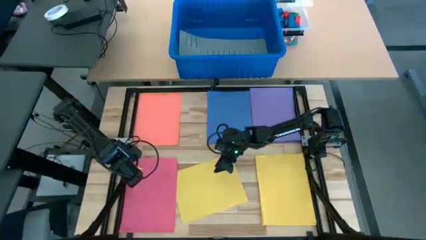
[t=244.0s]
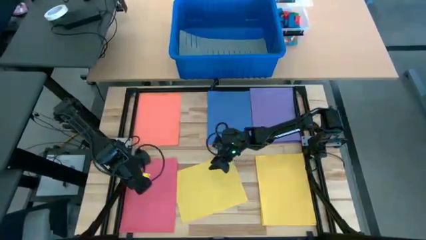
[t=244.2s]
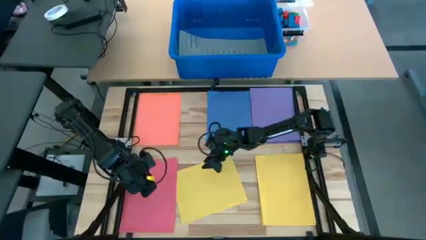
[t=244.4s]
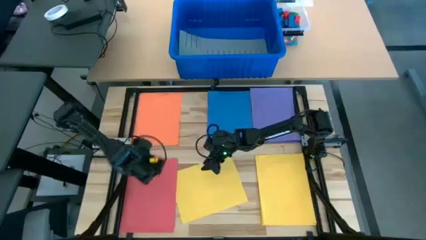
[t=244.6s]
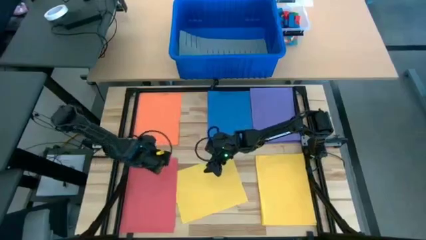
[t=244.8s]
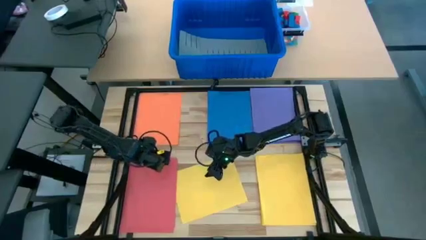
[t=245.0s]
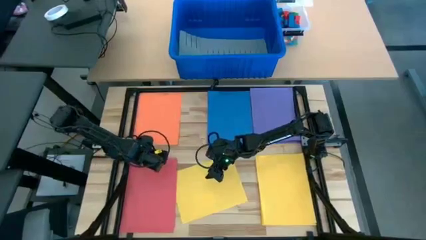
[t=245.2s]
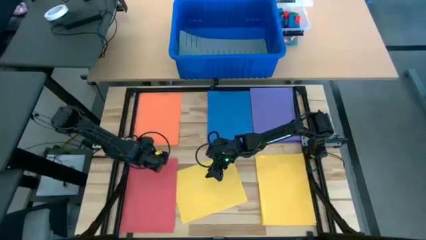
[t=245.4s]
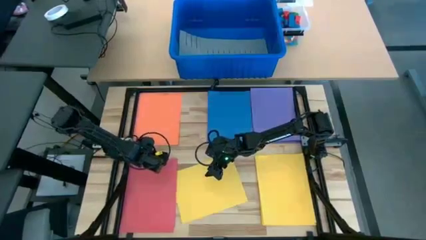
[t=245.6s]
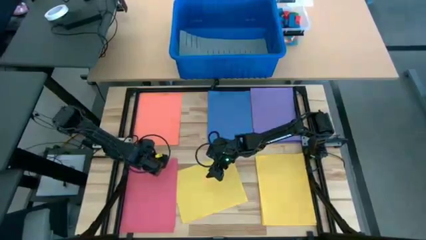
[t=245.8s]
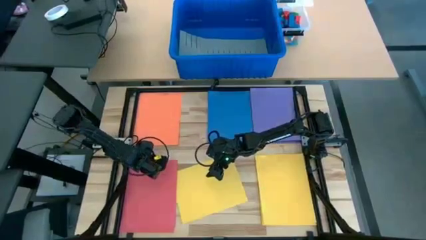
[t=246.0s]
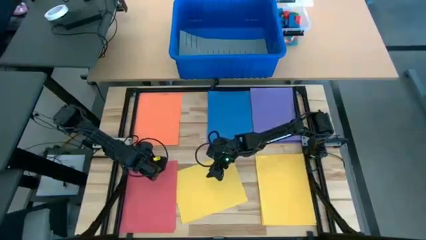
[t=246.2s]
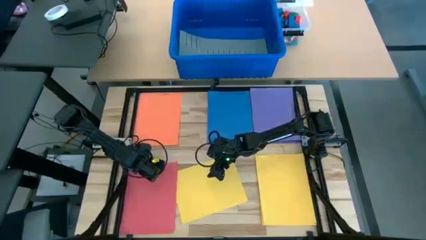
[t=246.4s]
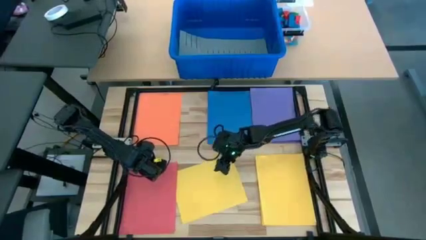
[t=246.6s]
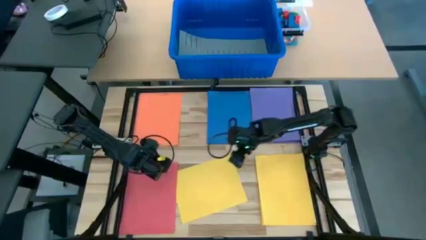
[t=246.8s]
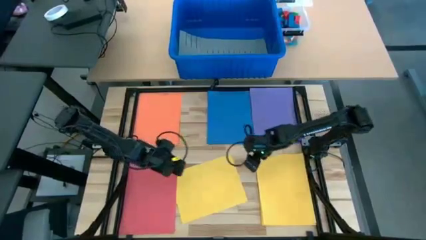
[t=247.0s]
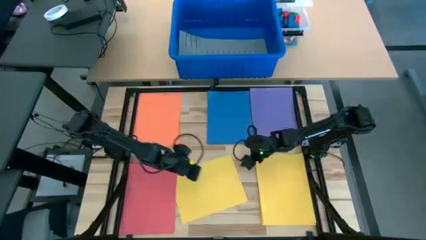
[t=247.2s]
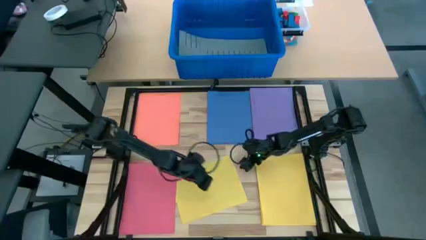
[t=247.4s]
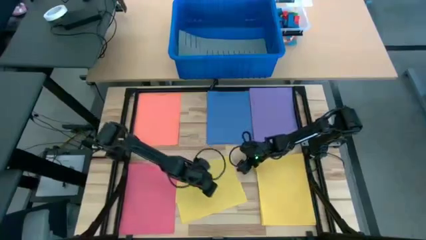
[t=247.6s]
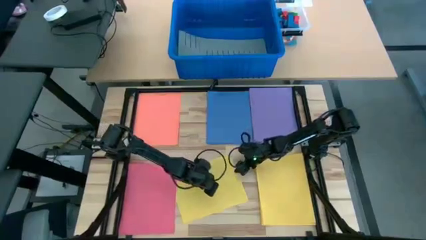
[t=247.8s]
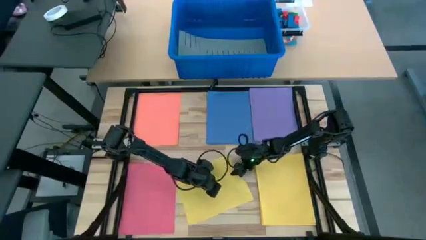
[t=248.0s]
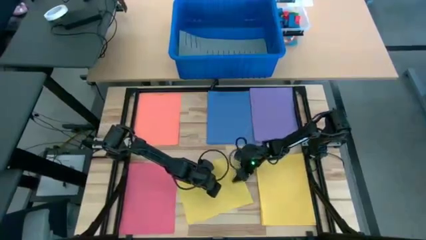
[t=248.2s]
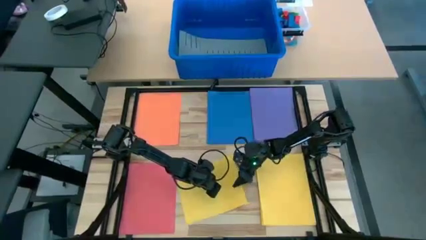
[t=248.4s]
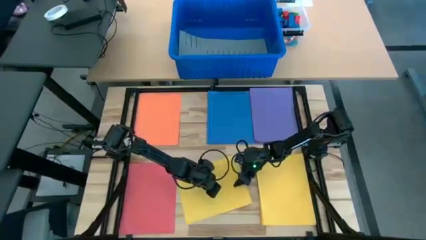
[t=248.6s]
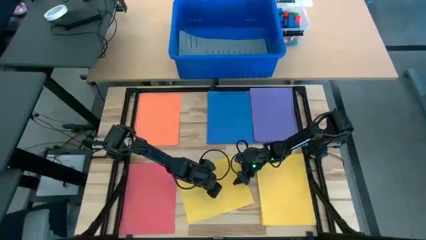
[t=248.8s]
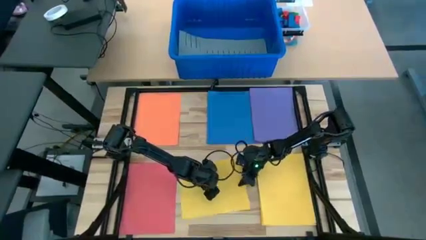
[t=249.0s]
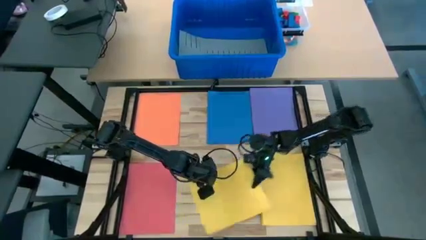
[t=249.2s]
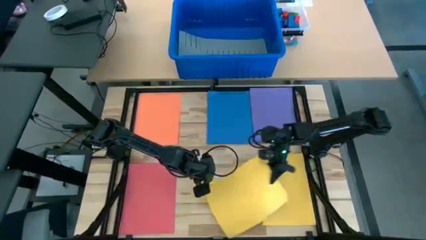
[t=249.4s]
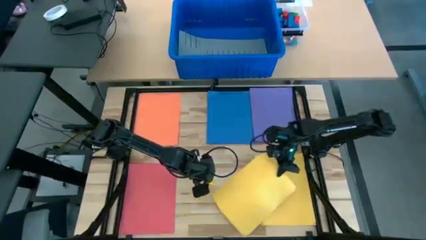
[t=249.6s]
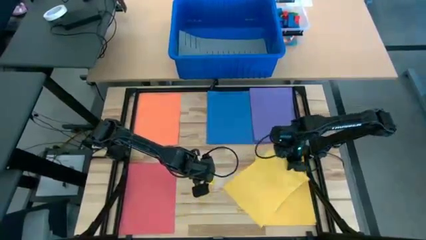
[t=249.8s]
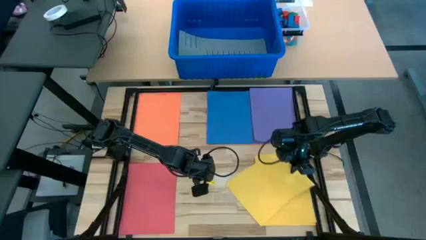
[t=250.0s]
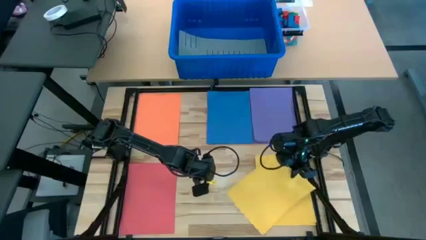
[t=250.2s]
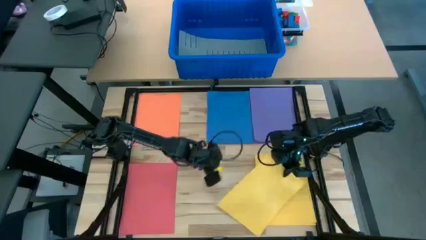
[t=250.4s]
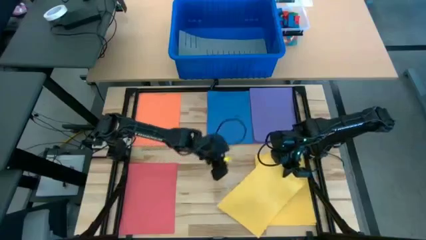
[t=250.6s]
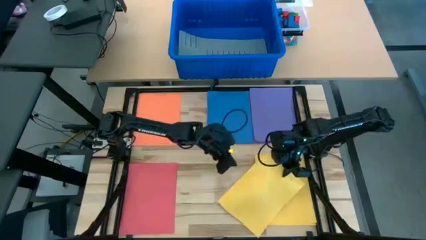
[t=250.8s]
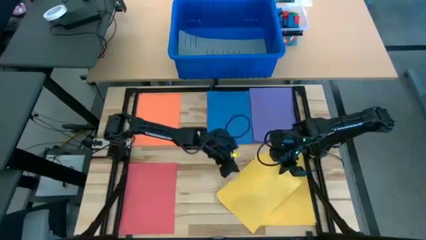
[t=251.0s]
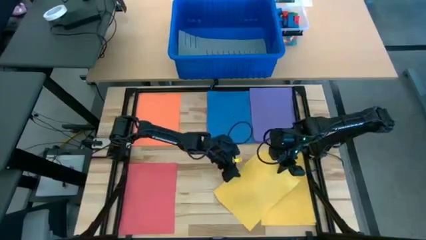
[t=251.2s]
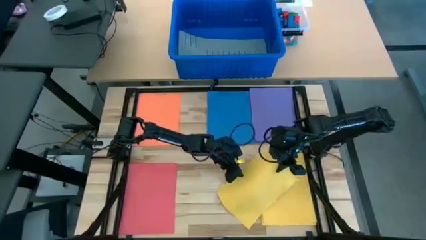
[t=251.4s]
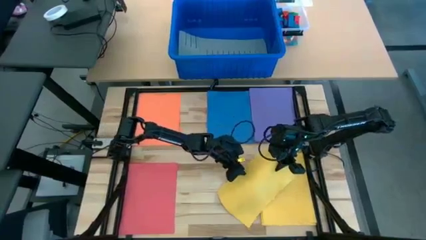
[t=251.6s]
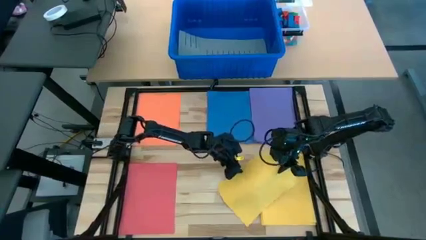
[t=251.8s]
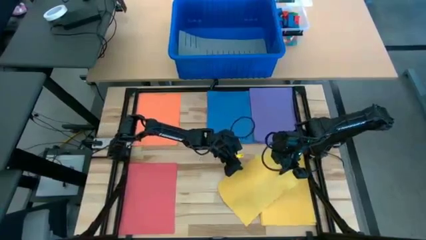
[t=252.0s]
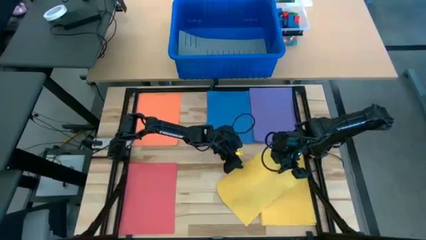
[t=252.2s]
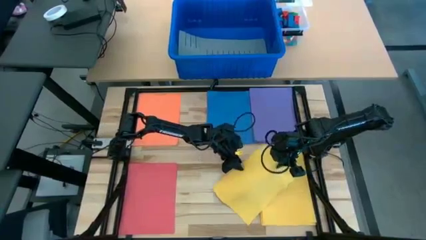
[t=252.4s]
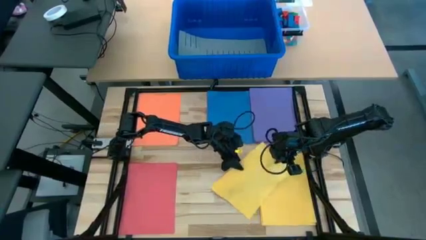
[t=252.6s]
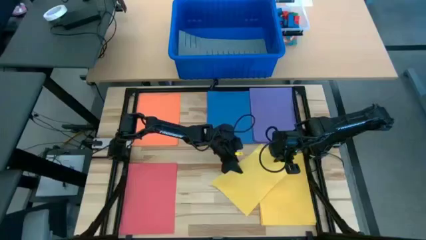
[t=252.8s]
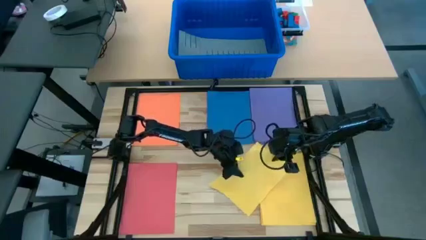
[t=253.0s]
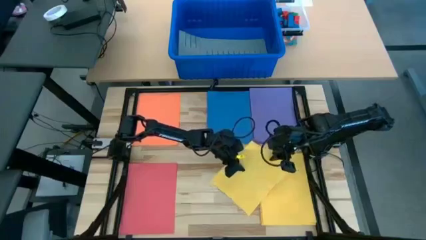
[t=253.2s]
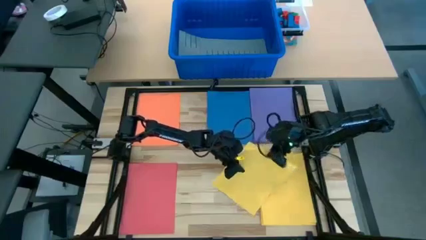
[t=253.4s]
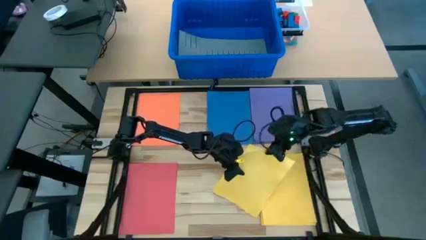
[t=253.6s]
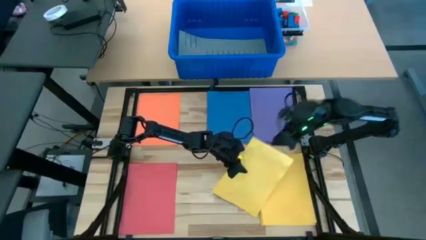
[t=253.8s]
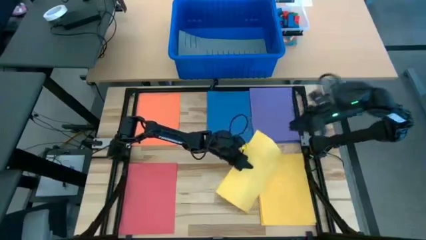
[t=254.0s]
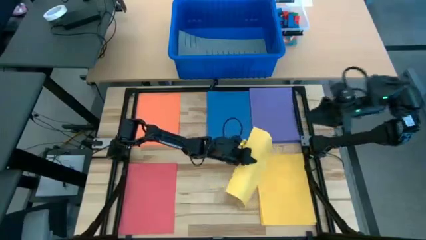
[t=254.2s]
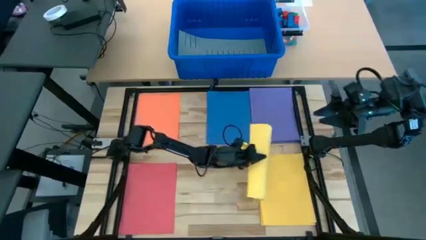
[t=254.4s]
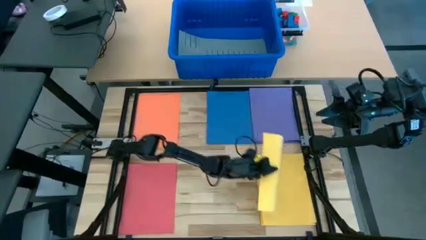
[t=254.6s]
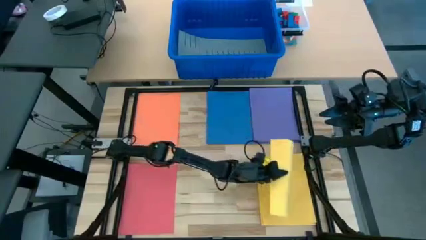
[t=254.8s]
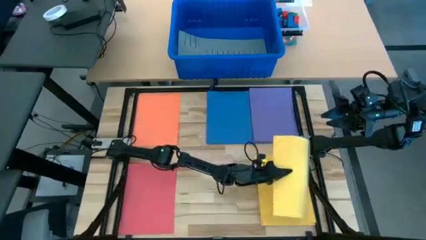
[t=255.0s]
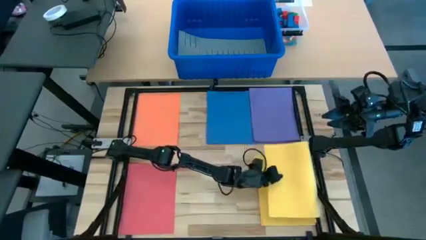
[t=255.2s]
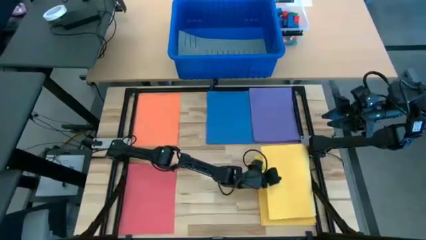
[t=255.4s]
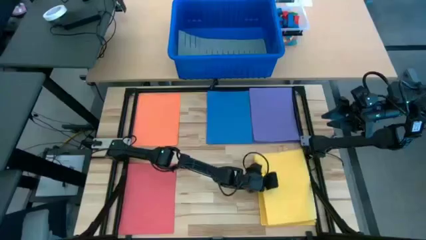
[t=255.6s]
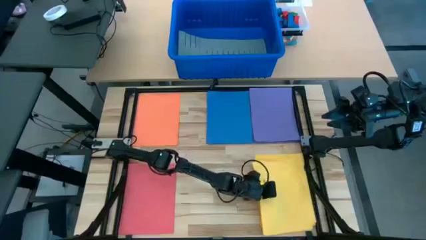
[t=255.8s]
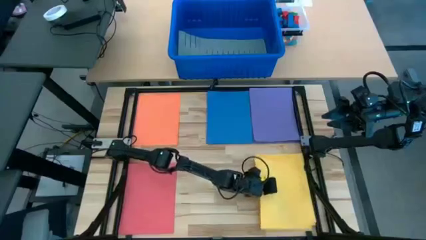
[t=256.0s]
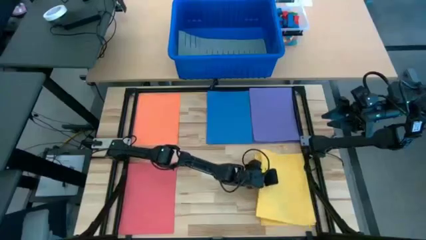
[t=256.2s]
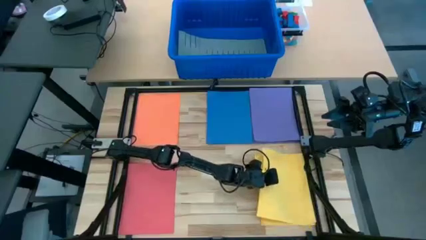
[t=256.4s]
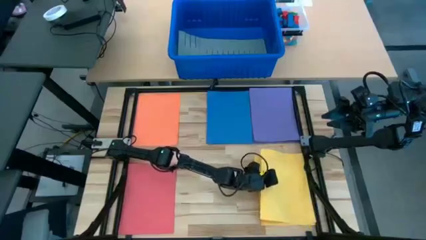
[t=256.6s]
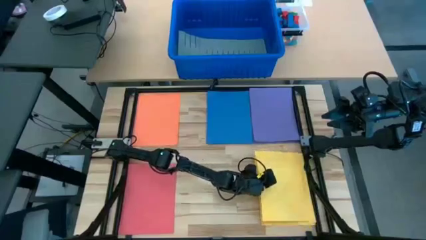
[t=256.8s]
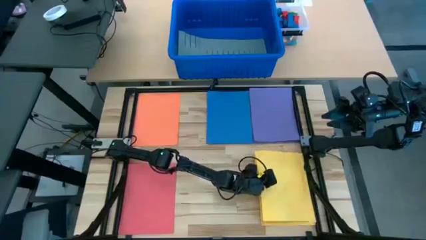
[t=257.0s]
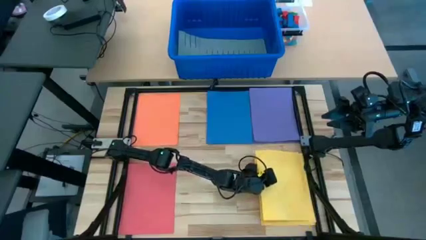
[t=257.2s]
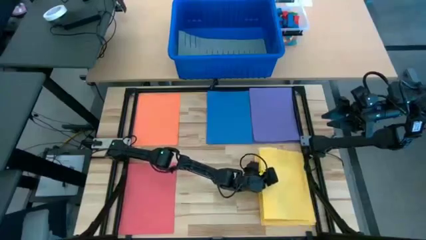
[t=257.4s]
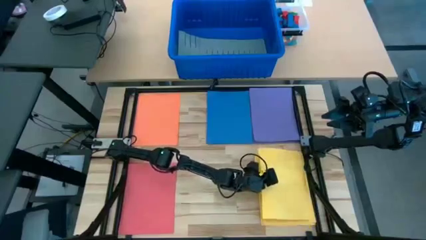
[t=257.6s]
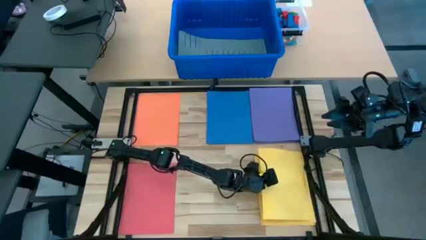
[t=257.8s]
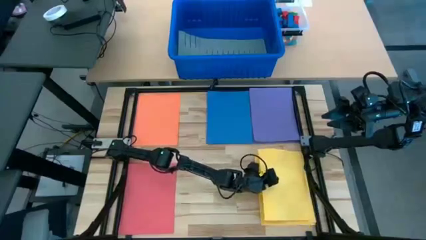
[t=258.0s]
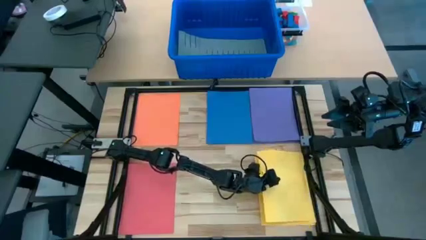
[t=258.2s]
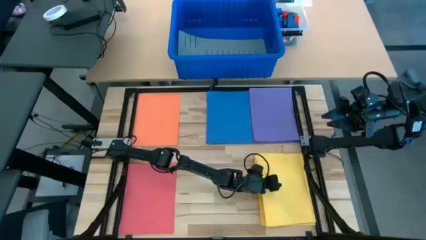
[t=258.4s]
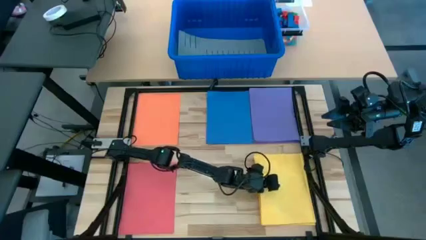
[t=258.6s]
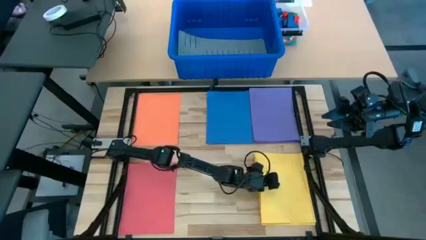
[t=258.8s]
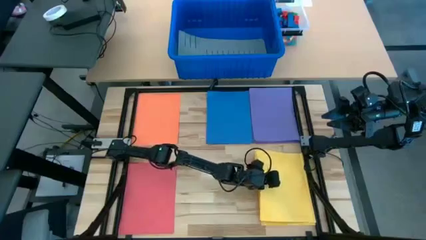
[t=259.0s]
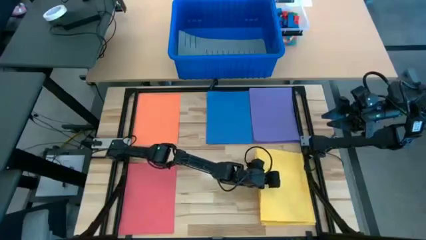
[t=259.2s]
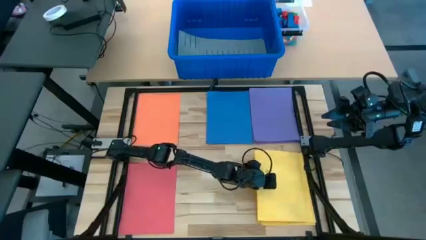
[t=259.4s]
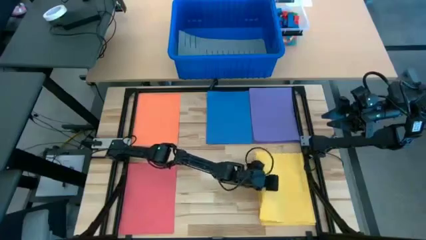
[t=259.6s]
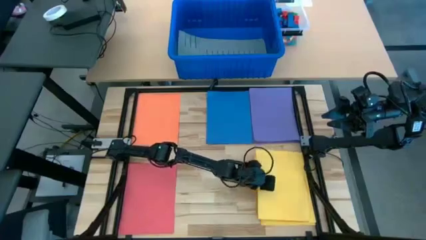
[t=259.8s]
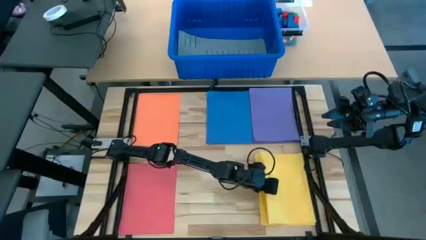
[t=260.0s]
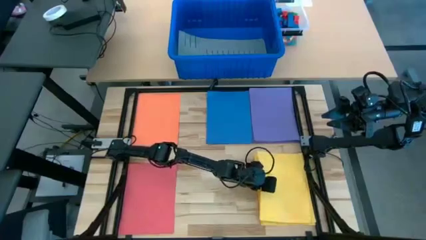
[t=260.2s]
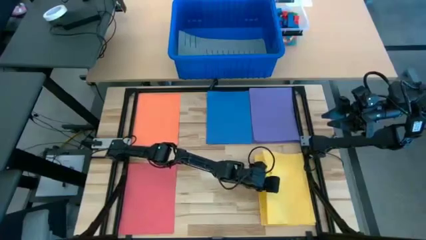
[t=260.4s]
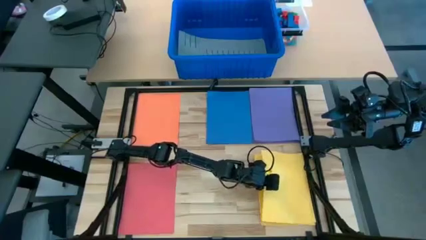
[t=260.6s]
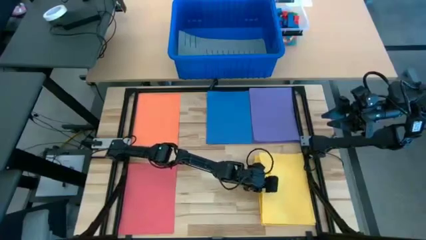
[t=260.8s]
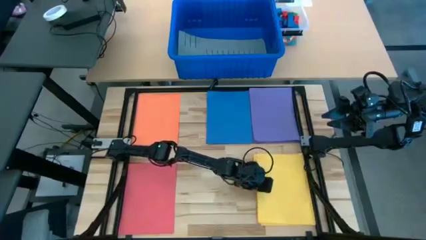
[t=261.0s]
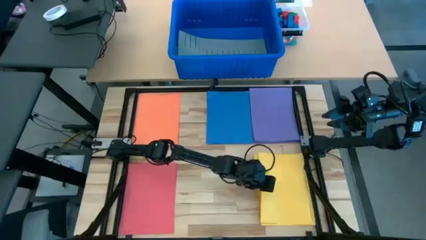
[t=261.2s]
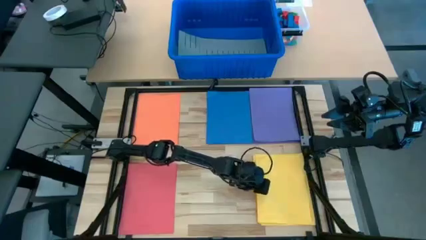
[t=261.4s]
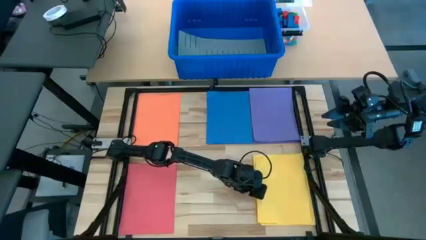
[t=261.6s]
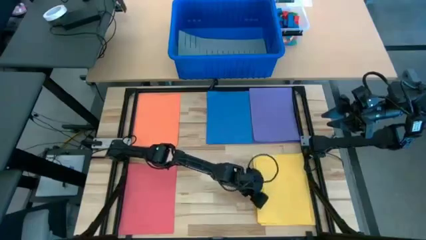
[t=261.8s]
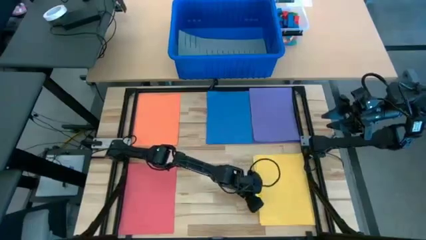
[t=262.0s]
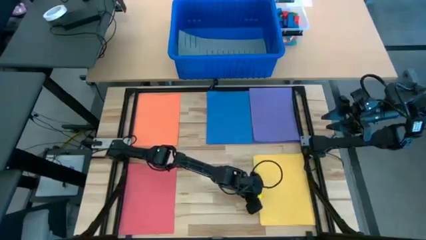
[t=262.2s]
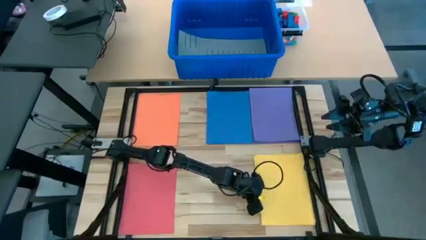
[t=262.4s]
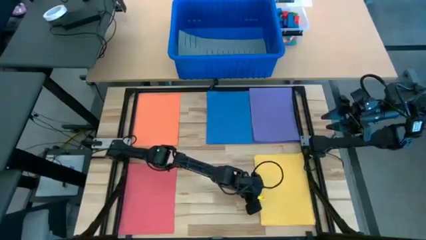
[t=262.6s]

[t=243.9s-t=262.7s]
Task: Organize paper
Stack the yellow paper on top of the other yellow papers
